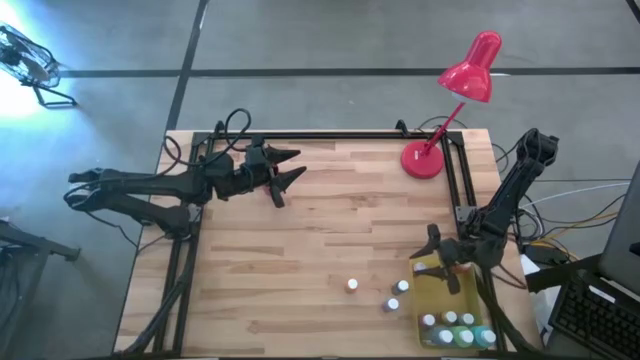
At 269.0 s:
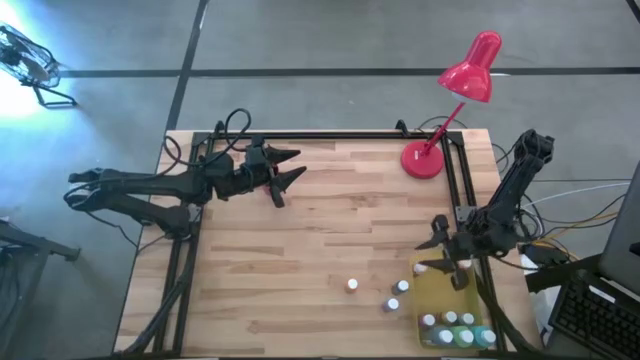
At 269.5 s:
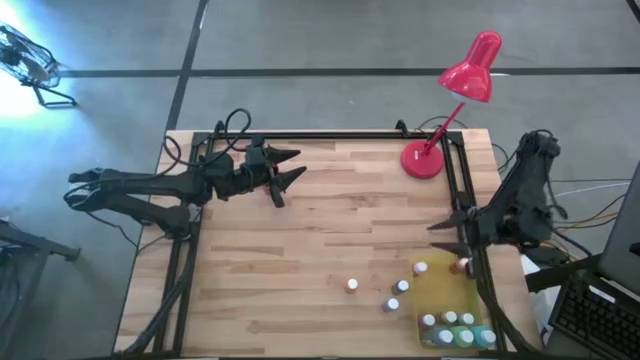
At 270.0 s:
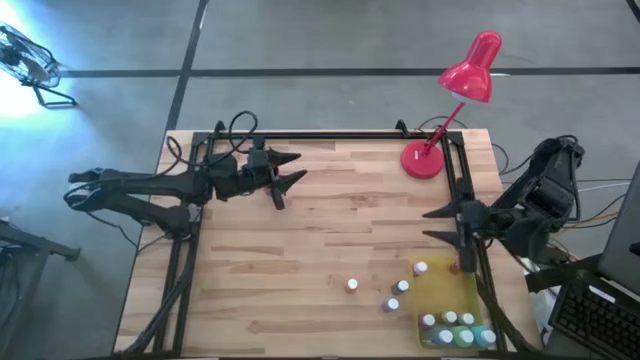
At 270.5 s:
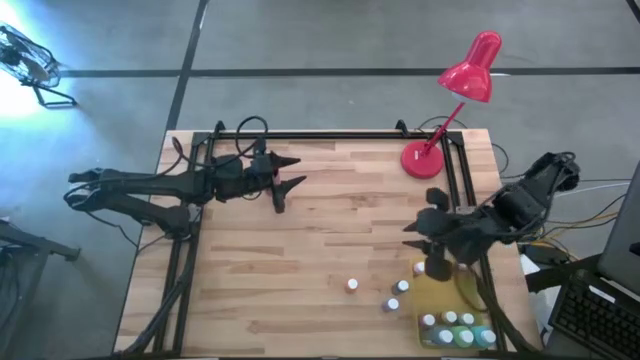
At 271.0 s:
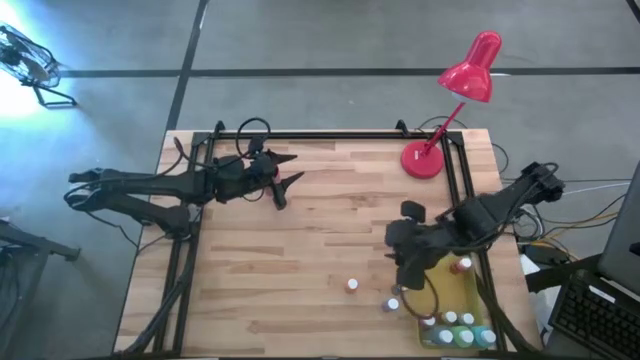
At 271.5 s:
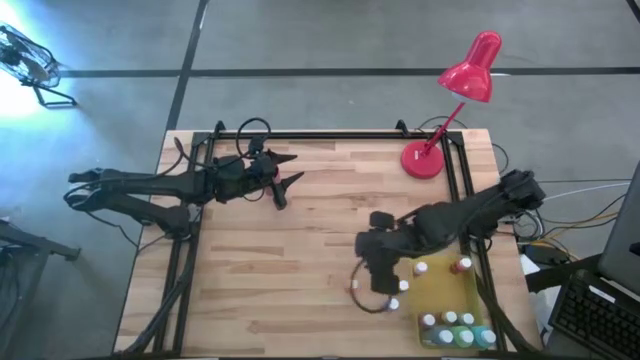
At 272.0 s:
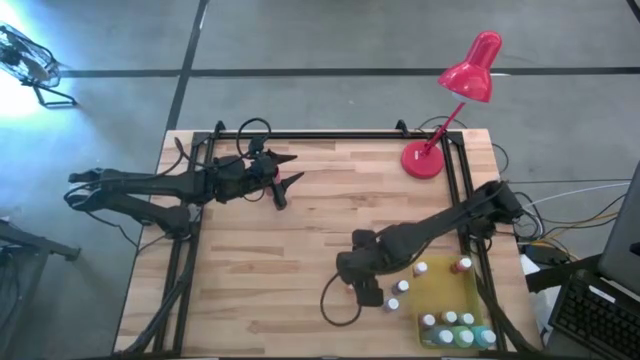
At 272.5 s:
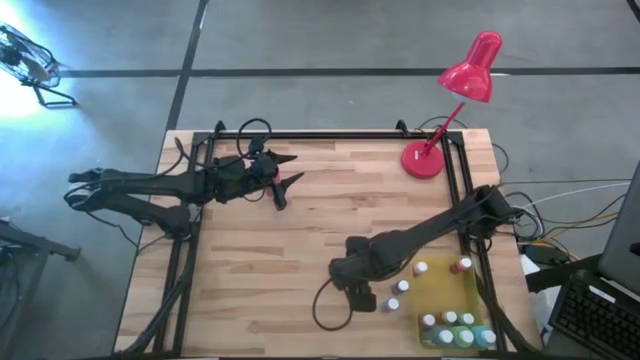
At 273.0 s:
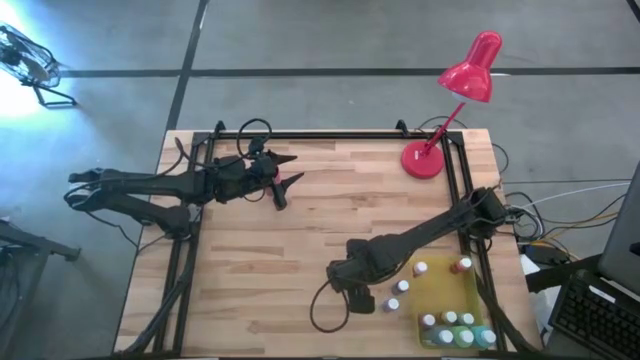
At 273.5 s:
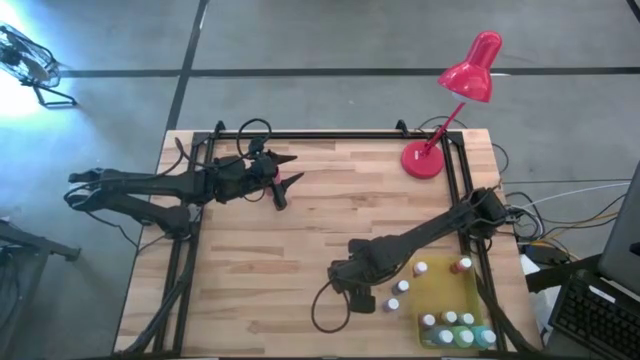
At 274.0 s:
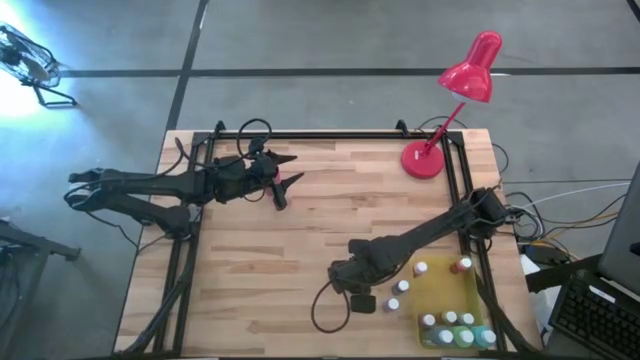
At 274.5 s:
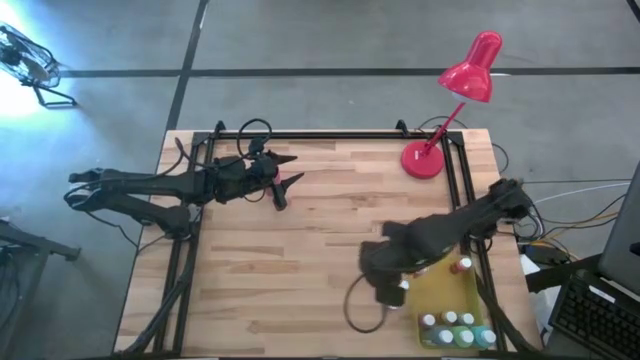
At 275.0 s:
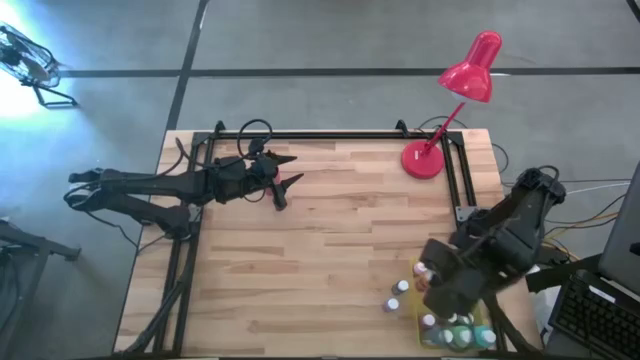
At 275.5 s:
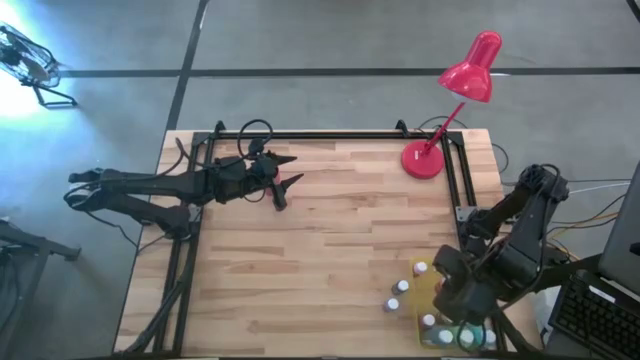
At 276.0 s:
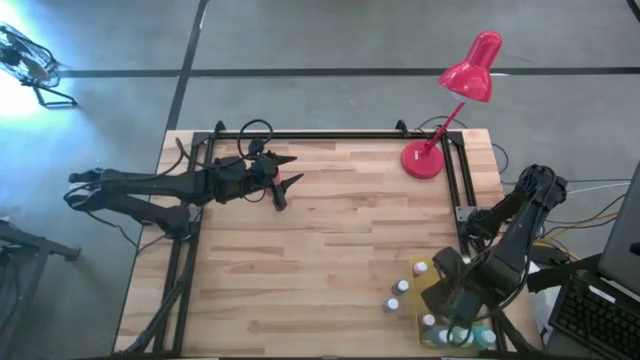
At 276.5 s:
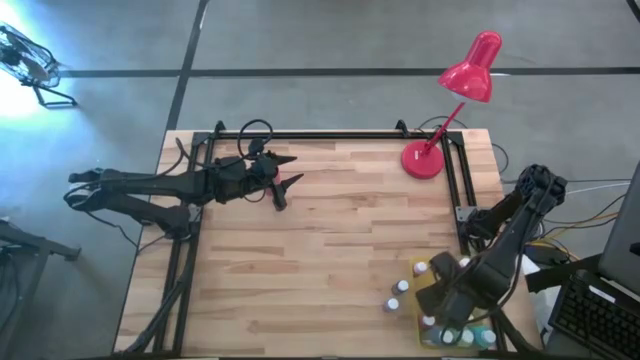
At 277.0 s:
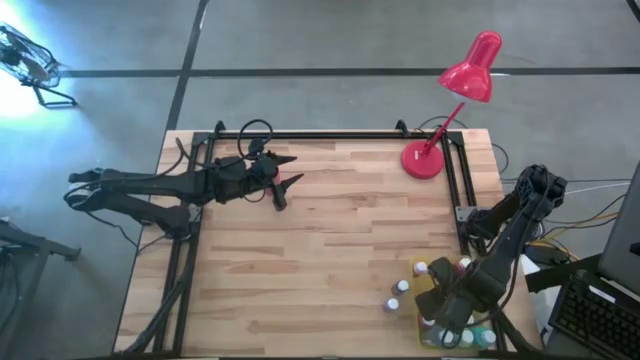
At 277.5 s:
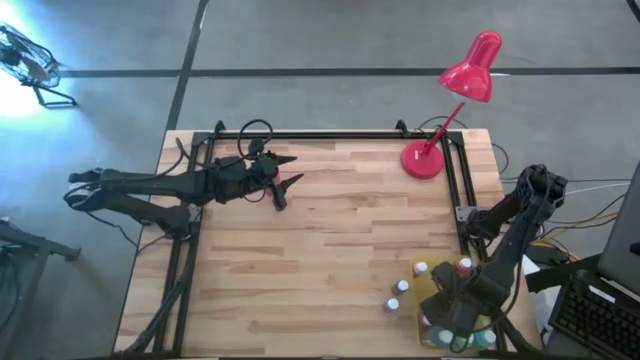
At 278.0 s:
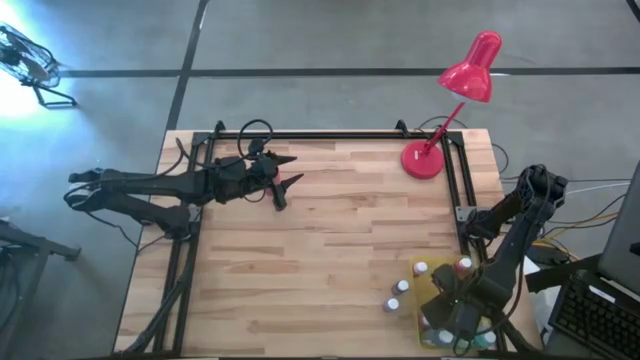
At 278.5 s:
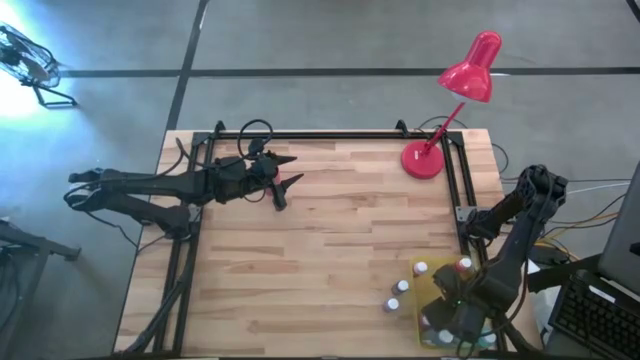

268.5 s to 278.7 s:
Task: Pick & Place Paint Supplies
Put the orange paint bottle into the yellow bin

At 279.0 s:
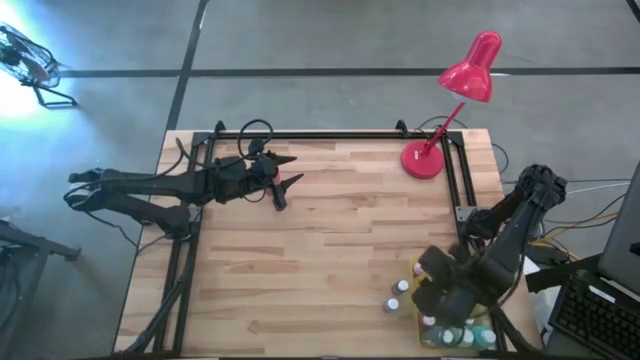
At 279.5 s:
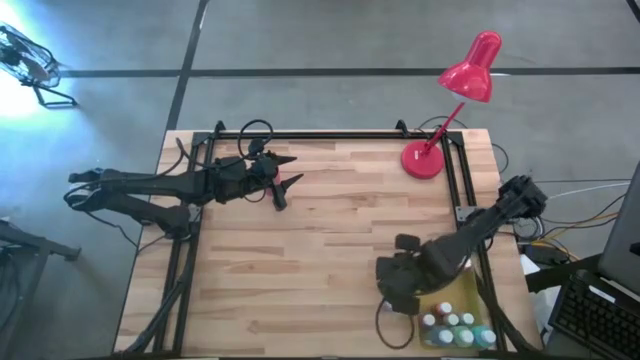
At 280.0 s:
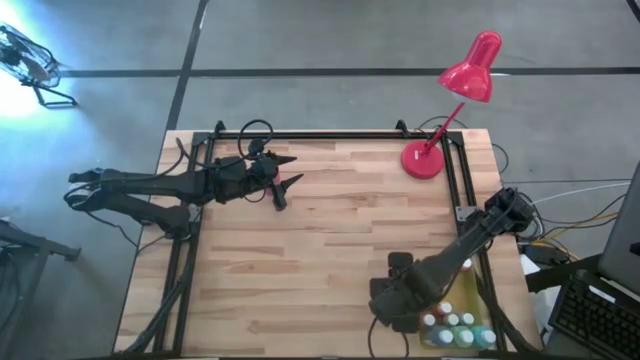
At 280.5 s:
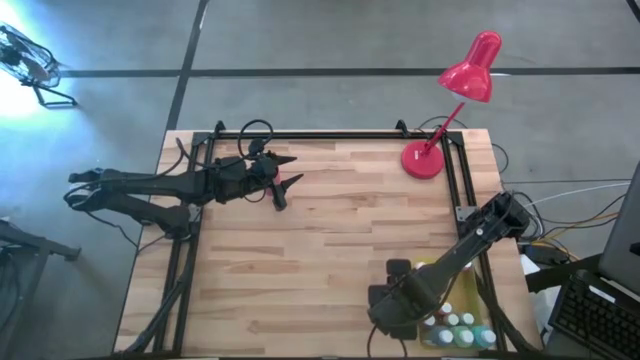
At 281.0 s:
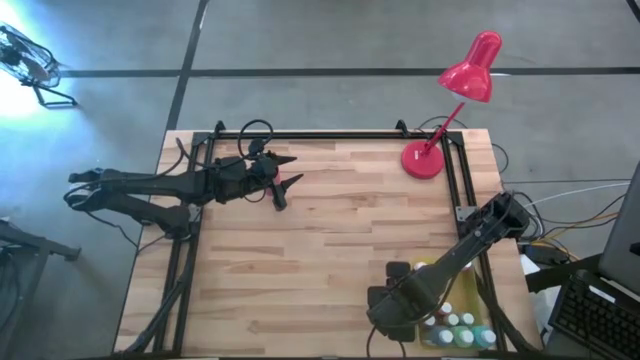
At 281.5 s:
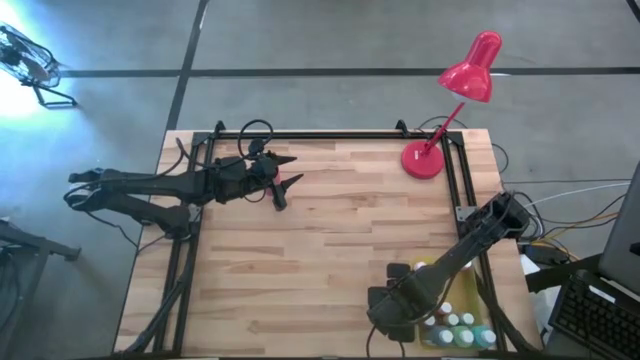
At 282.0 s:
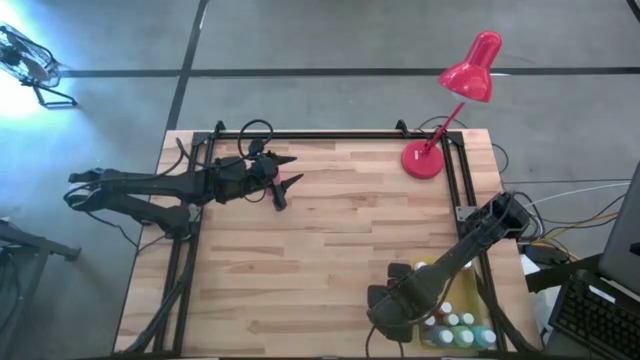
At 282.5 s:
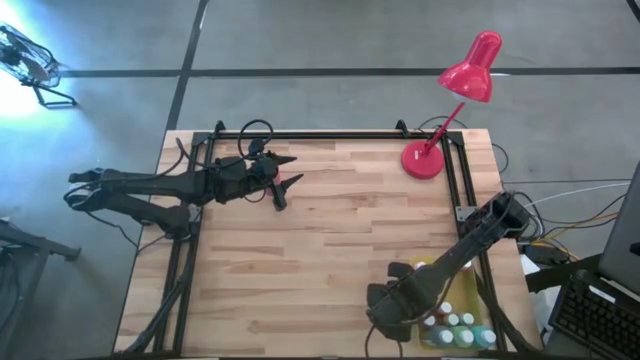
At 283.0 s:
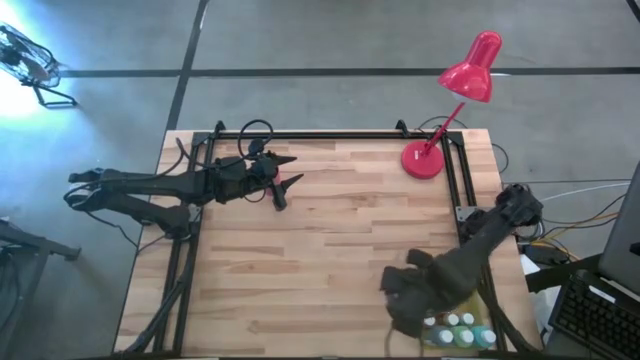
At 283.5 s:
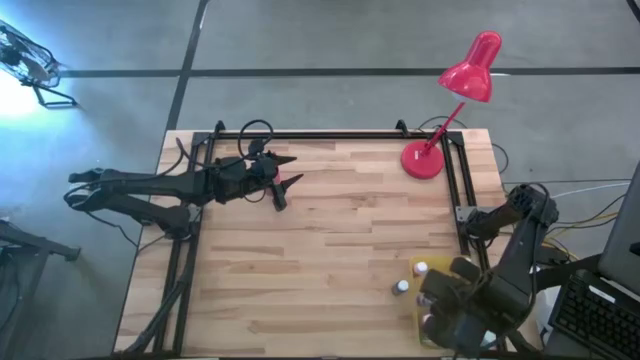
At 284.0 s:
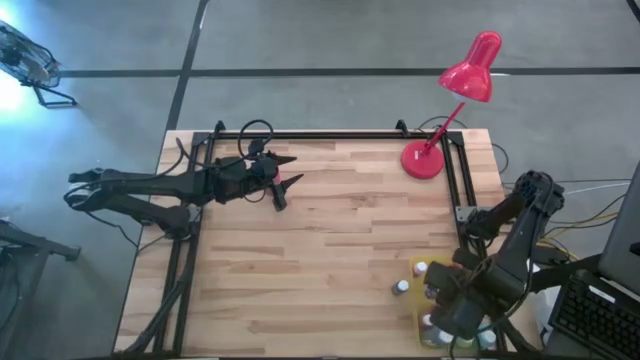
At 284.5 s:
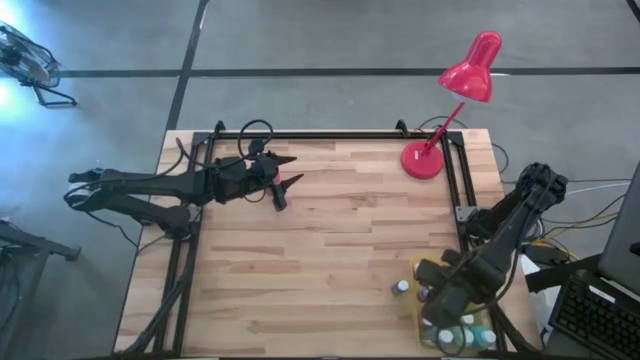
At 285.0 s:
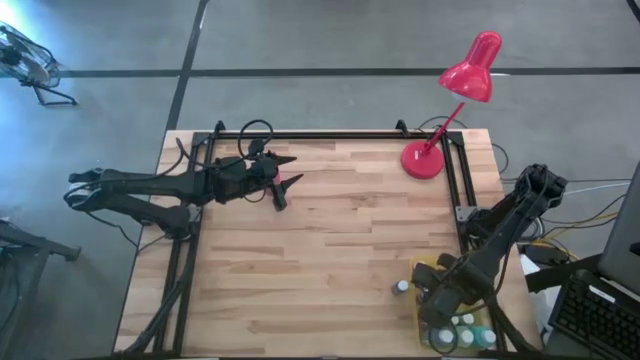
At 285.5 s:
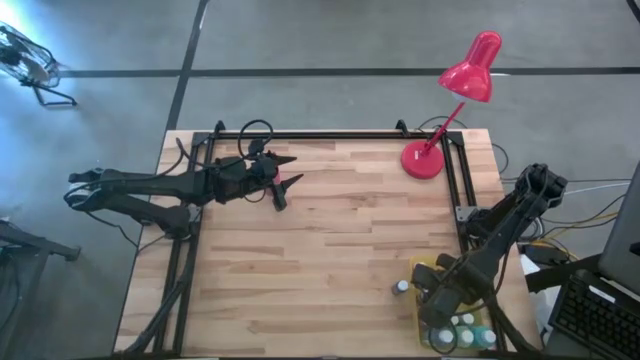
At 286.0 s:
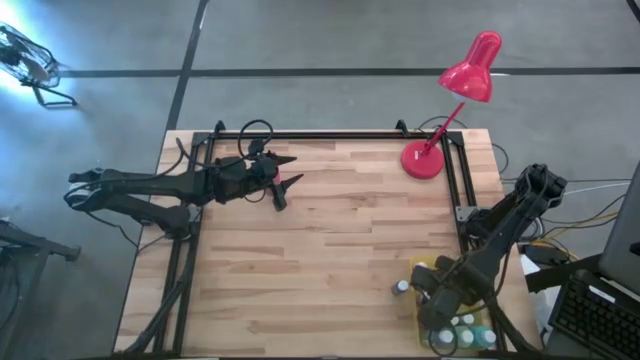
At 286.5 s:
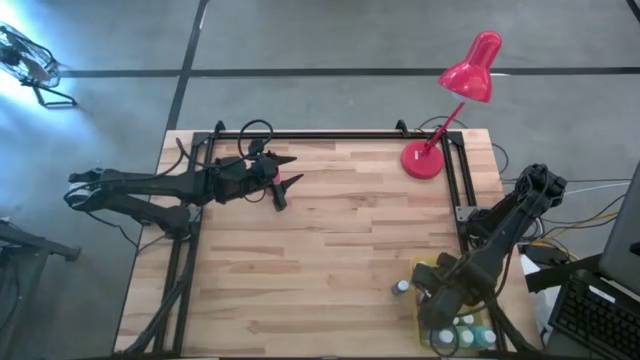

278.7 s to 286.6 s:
Put the light blue paint bottle into the yellow bin
